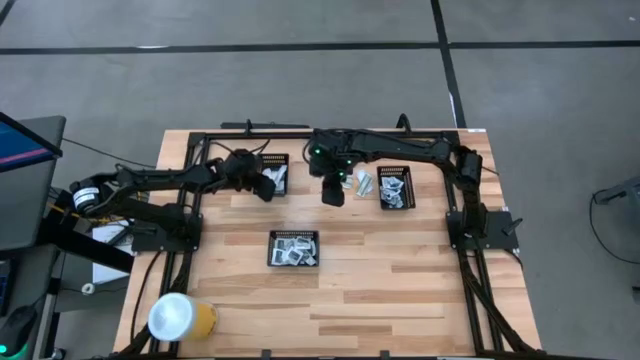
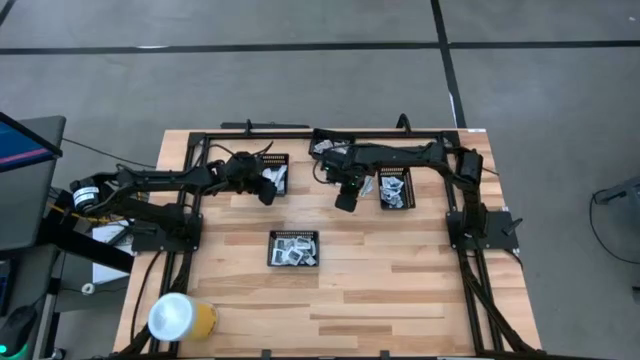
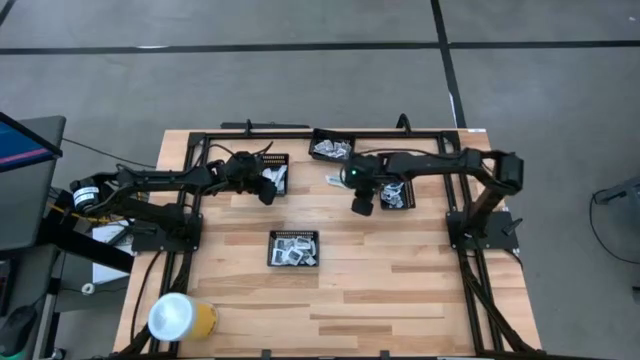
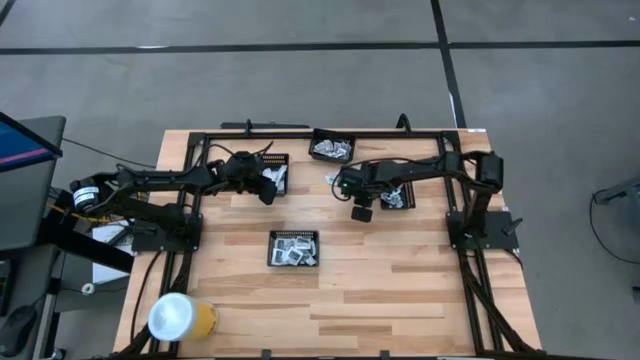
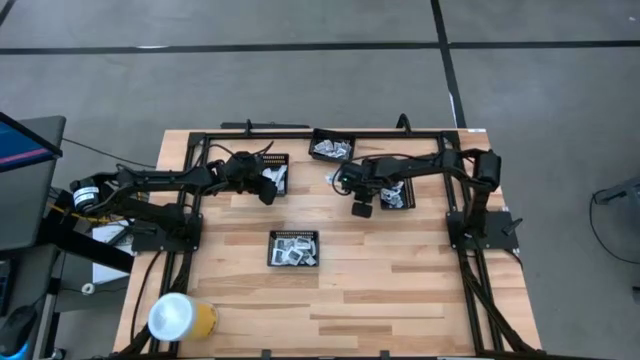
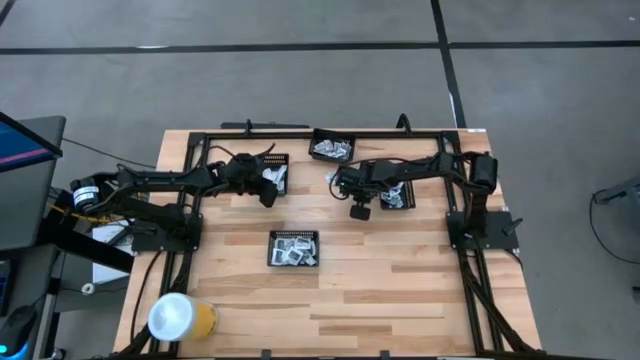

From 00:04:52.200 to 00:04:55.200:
Task: Pick & Place First Aid Supplies
Put the green bandage into the left black bin

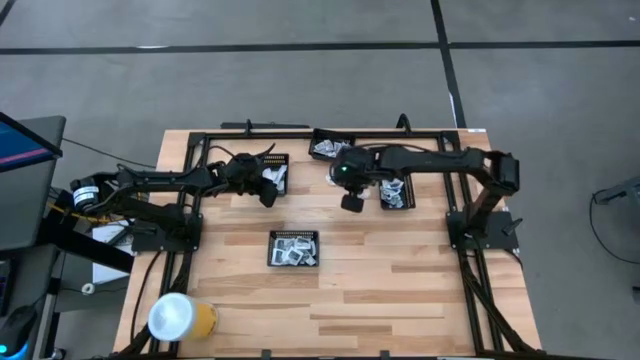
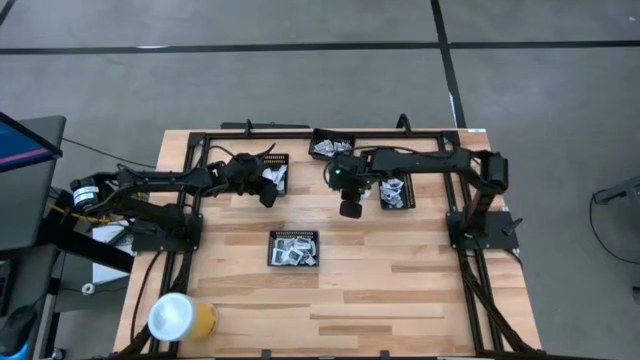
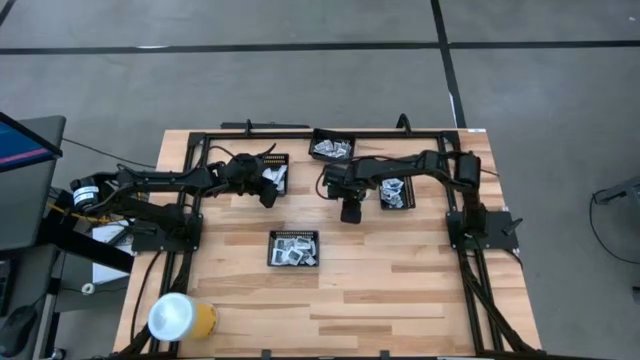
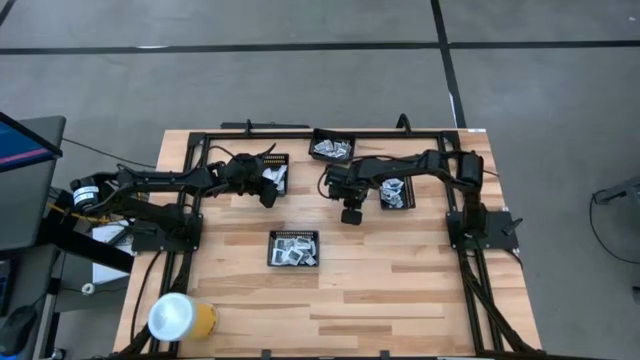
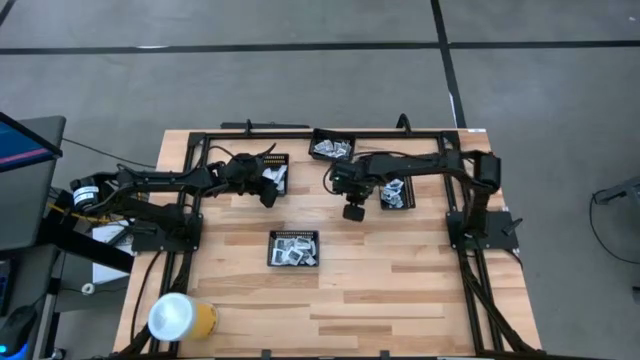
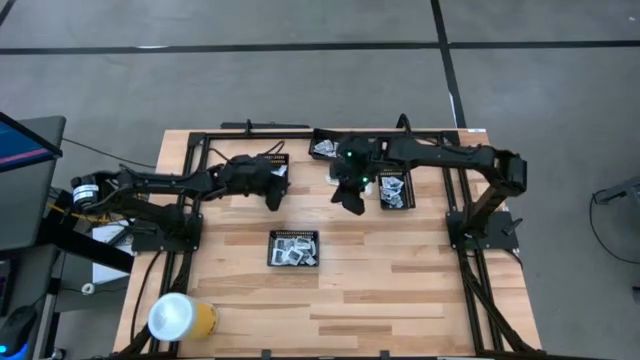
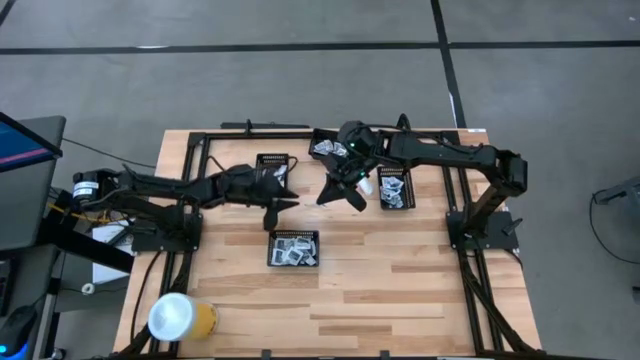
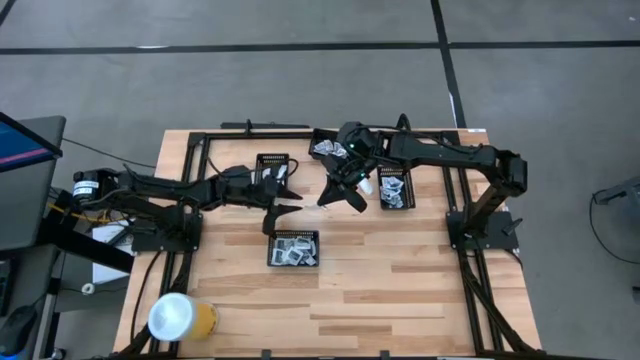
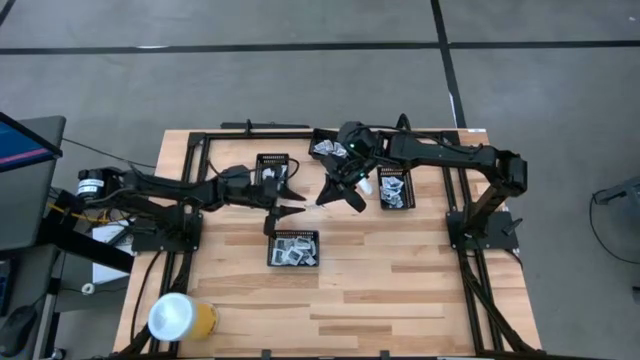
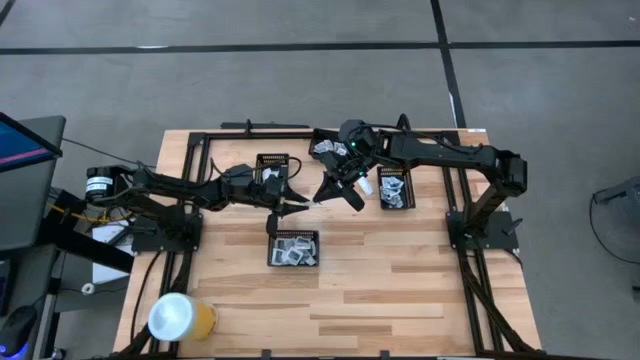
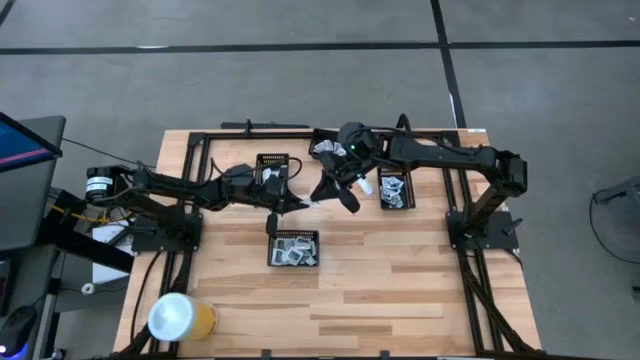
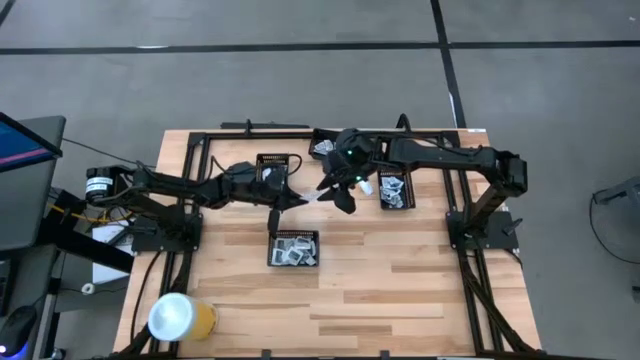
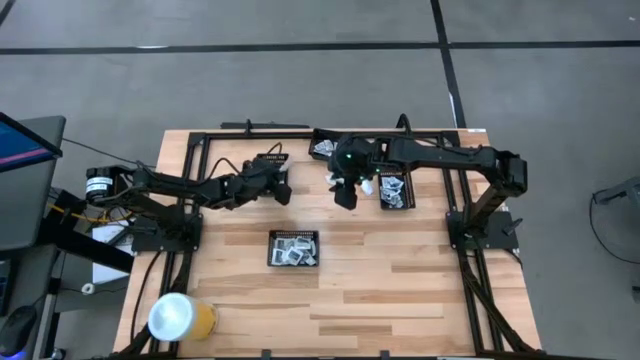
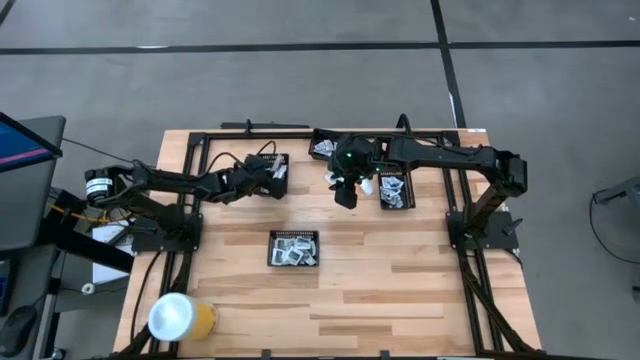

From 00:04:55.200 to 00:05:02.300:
Put the green bandage into the left black bin

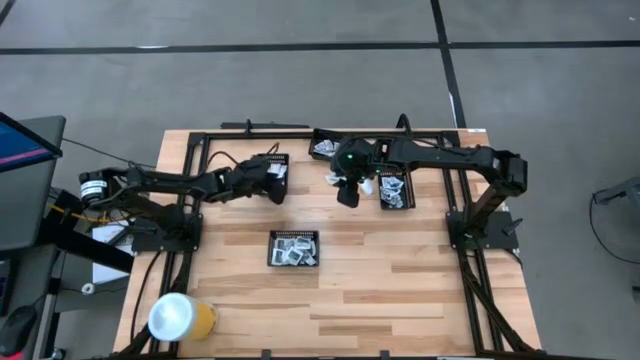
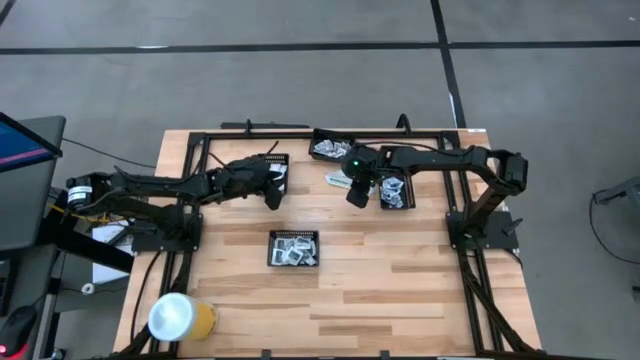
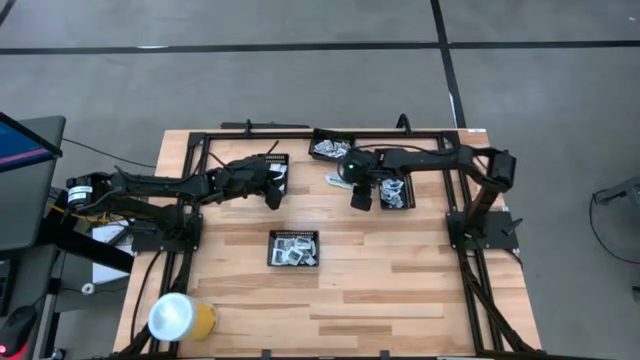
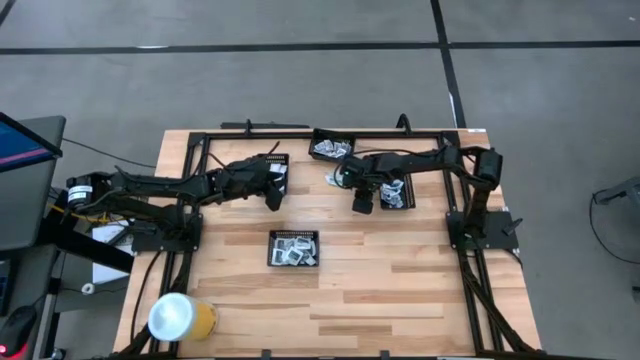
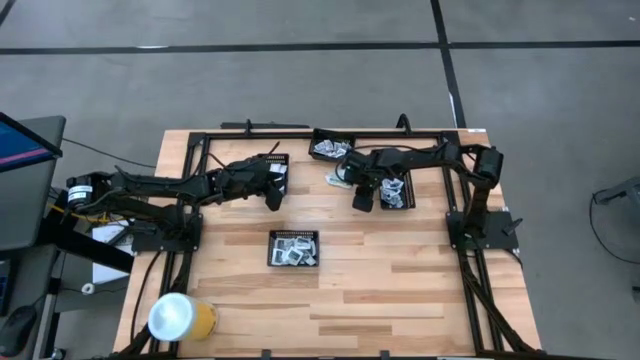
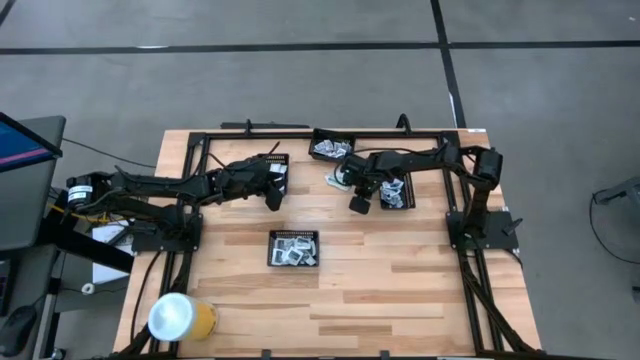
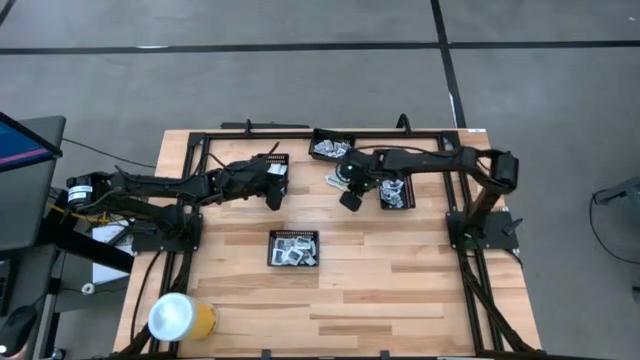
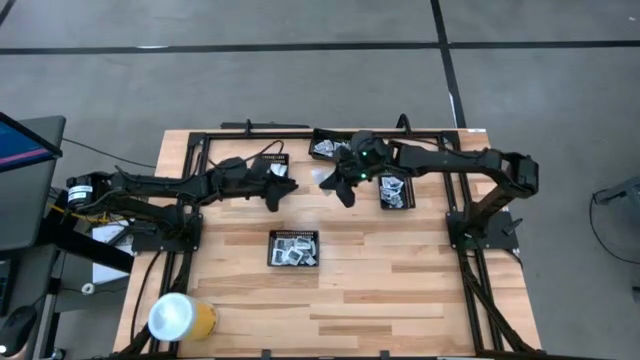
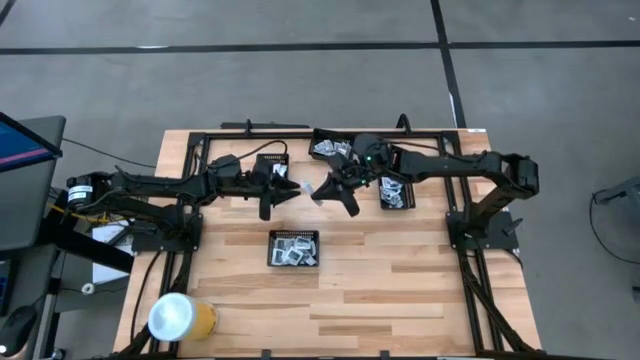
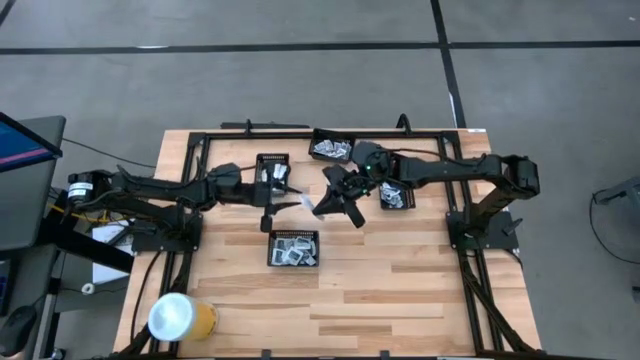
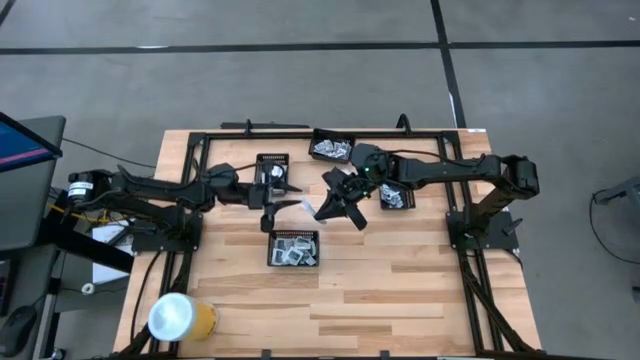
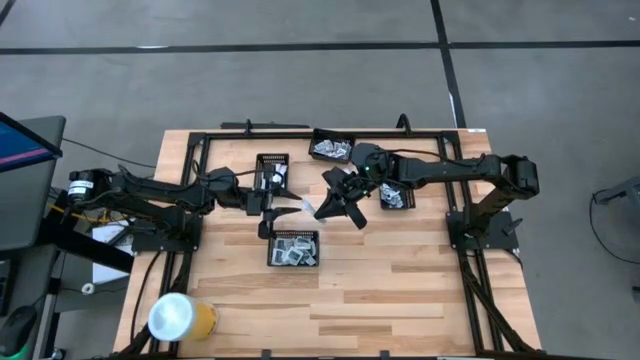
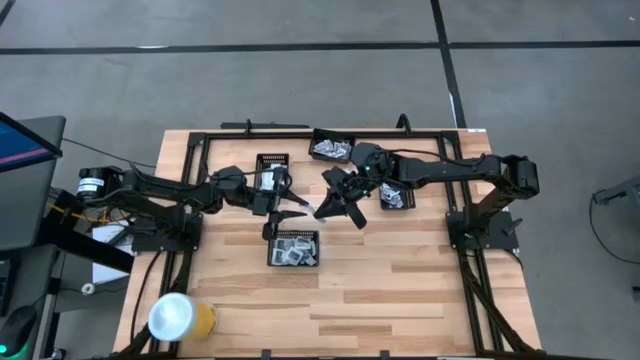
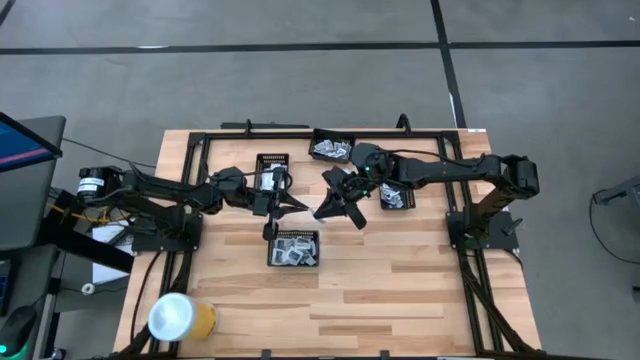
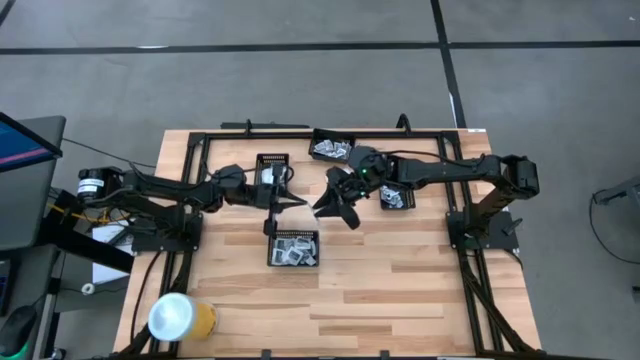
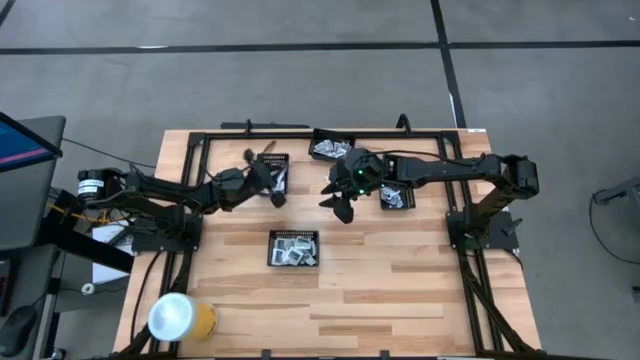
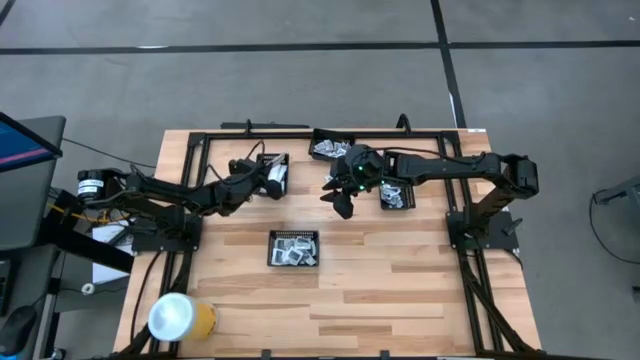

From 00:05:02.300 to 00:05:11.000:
Put the green bandage into the left black bin

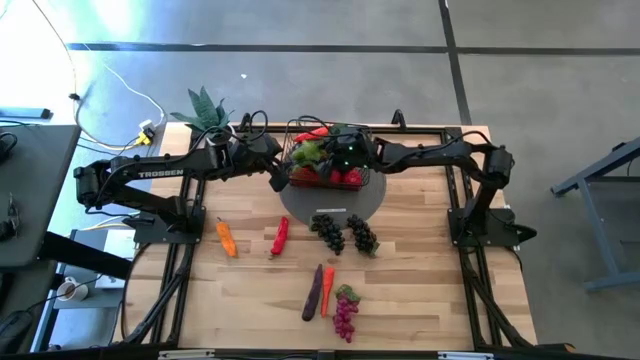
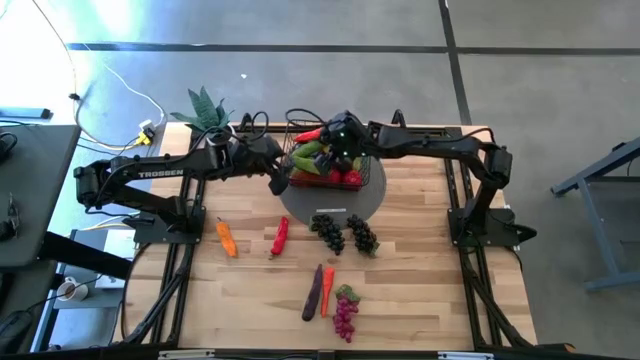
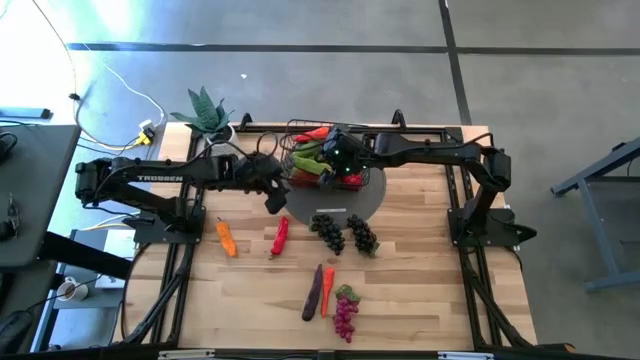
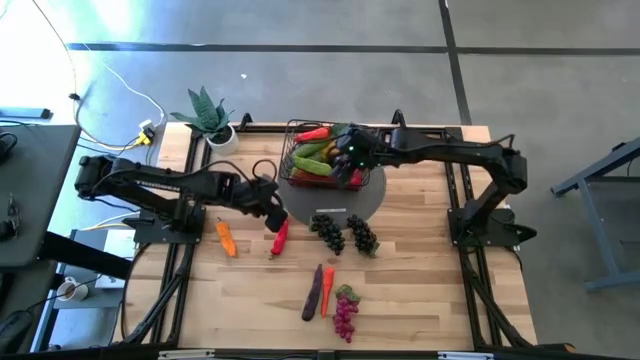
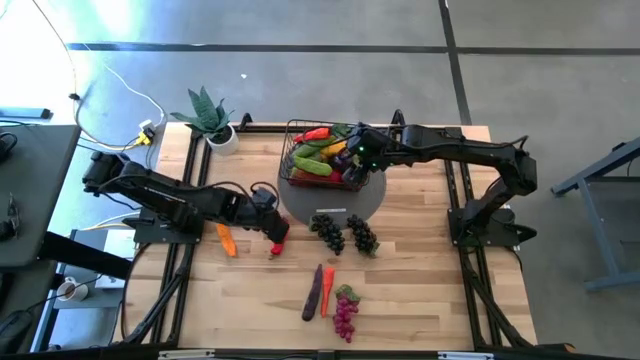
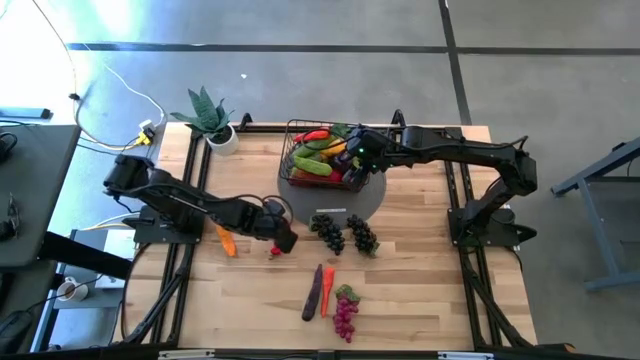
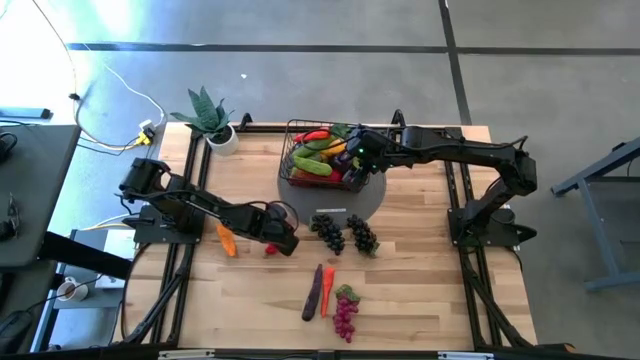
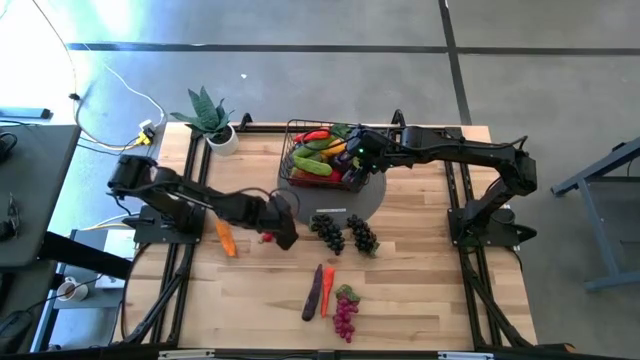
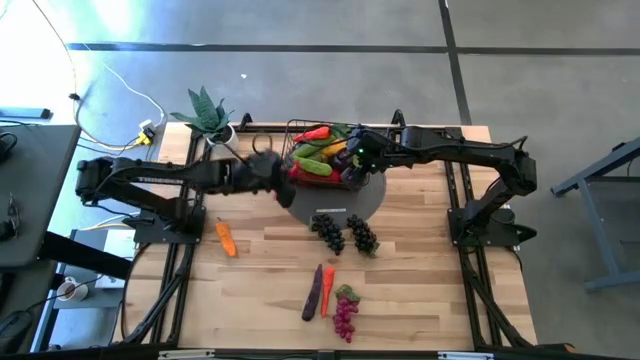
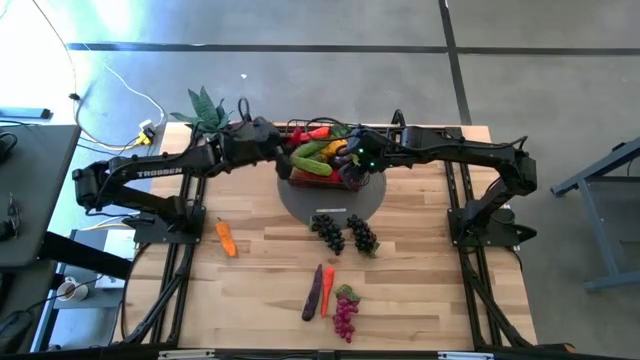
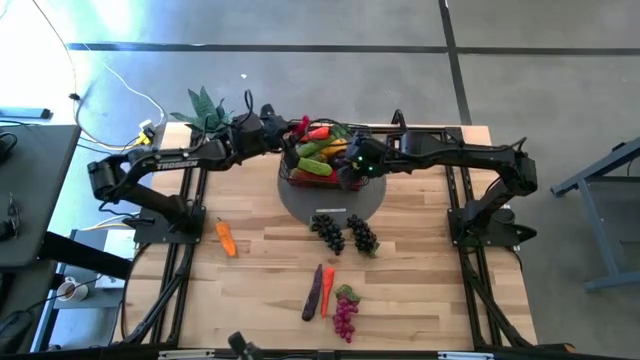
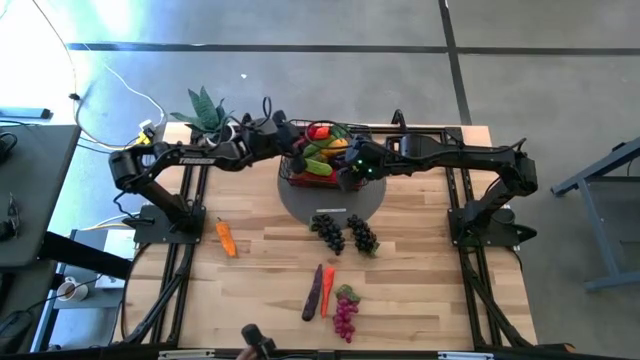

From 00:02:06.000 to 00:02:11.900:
Task: Build produce basket
Put the red chilli pepper into the wire basket
